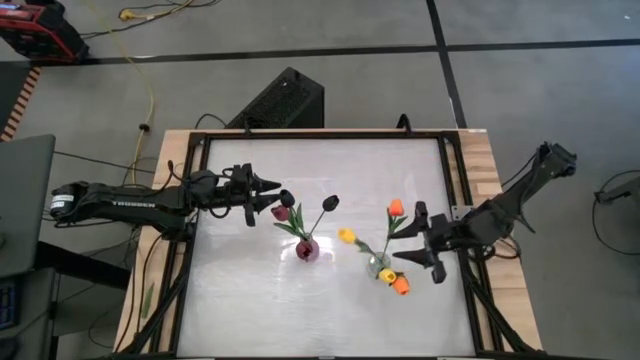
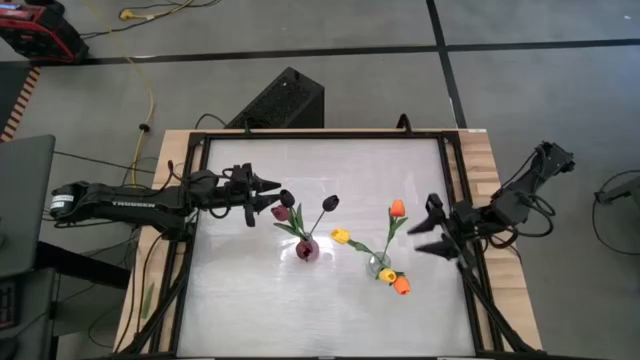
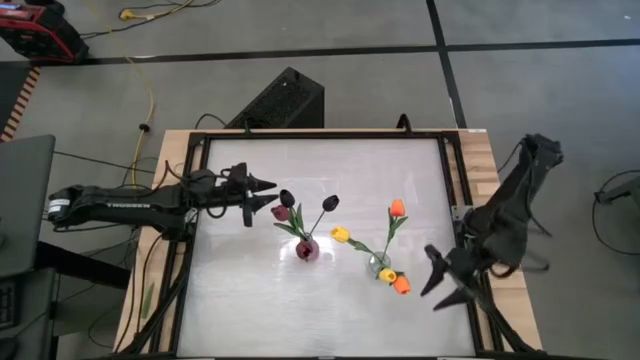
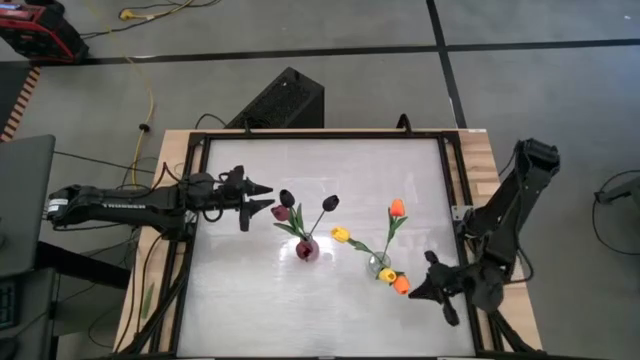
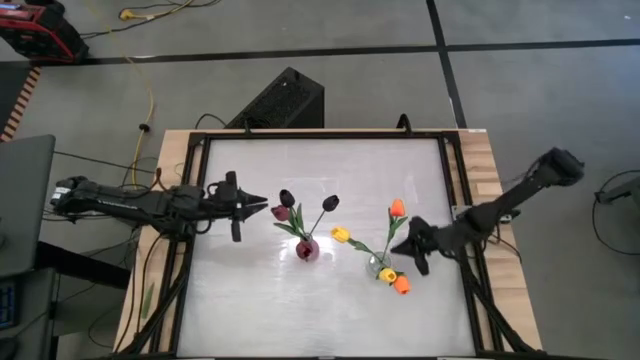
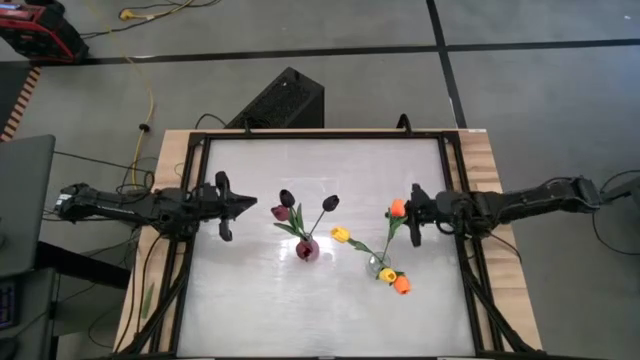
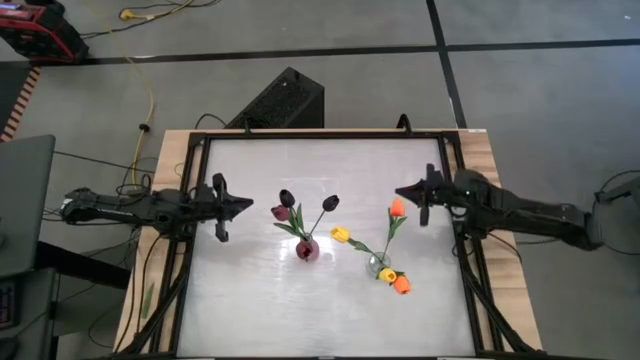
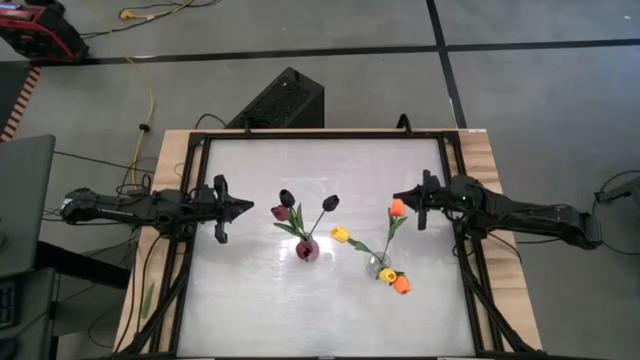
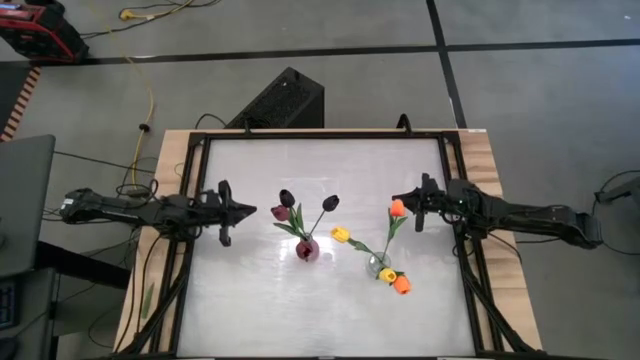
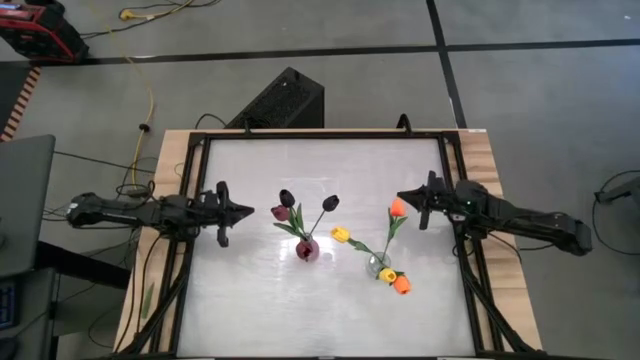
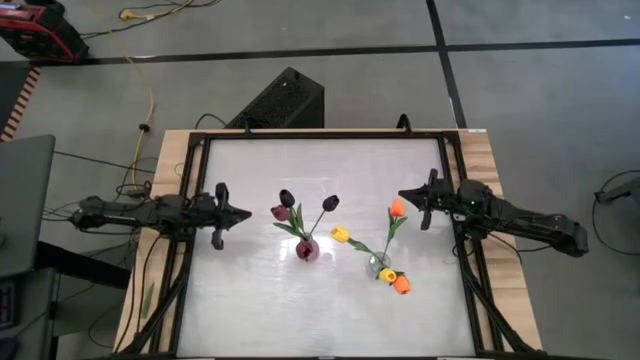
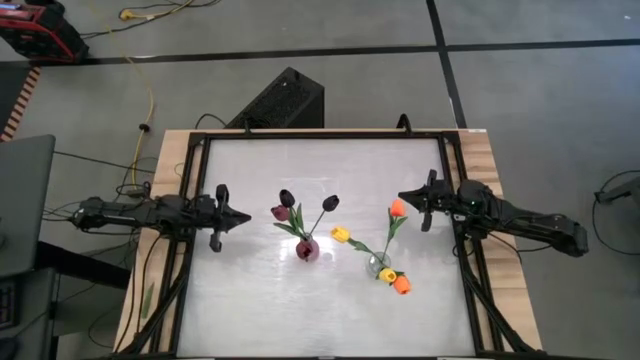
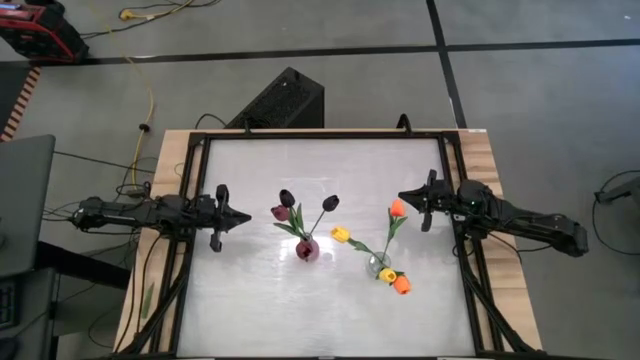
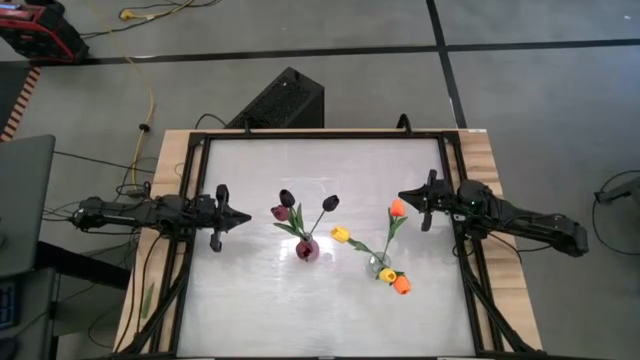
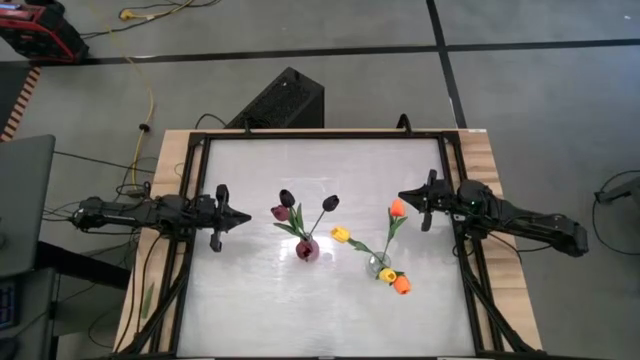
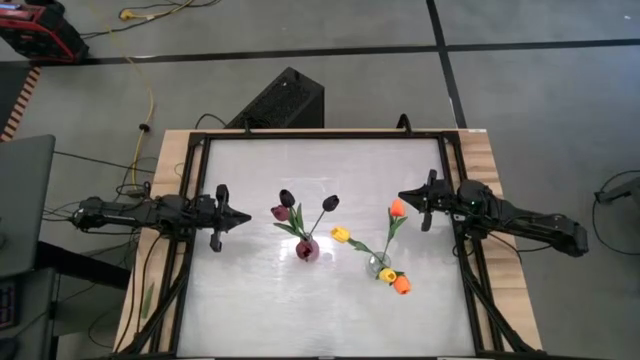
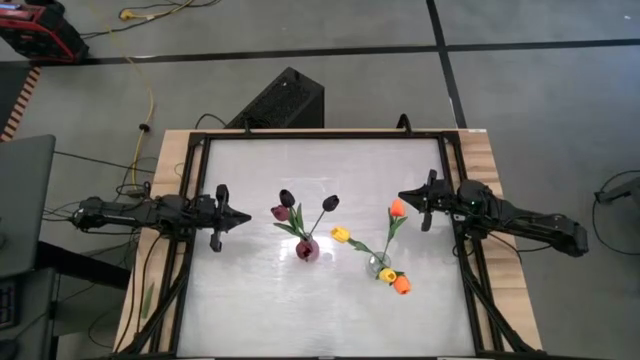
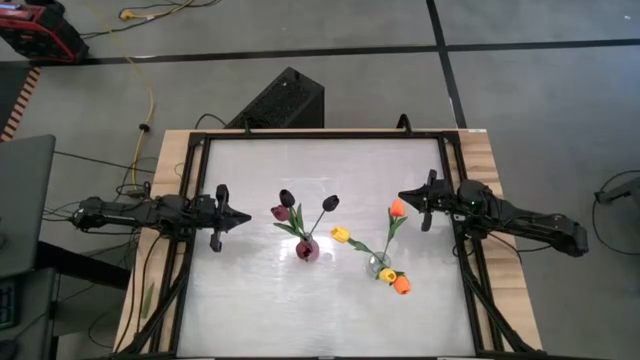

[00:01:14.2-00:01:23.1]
Task: Sort flowers into vase by color
Return to Home Position

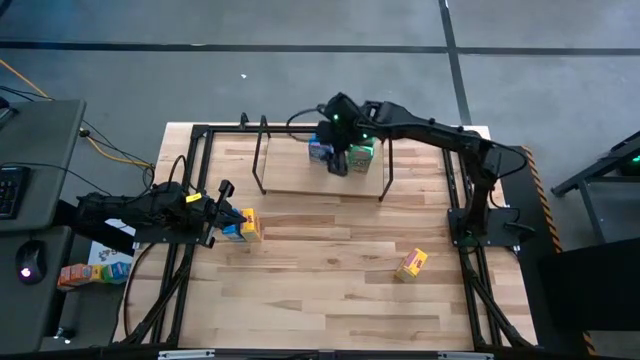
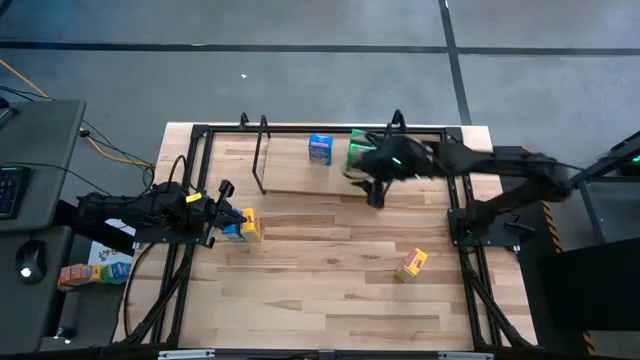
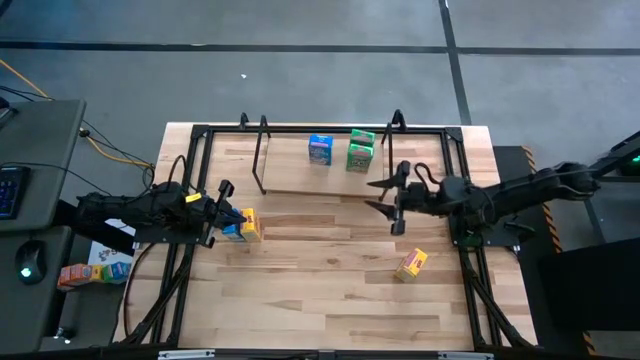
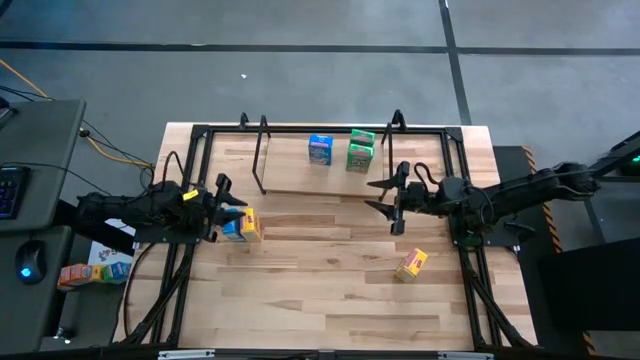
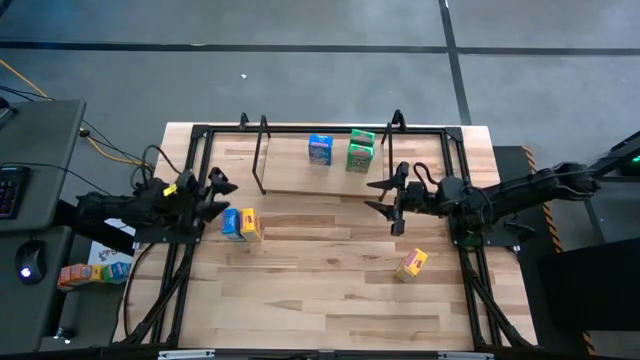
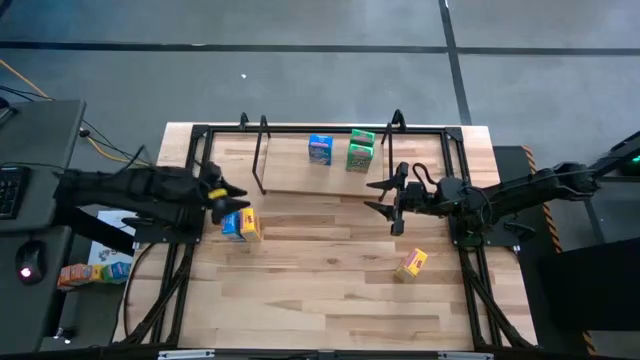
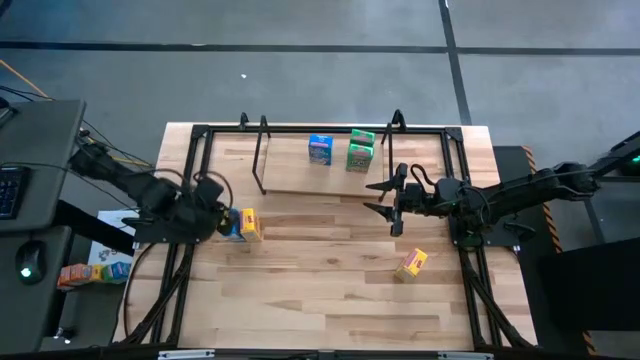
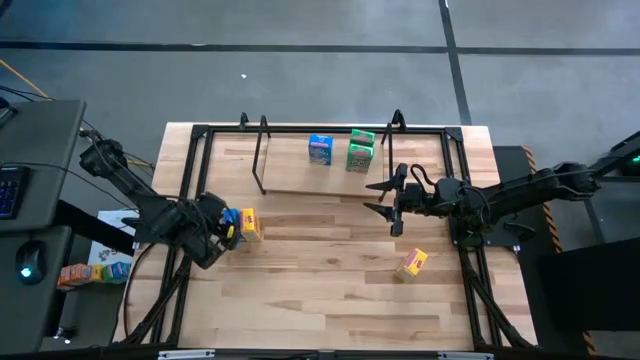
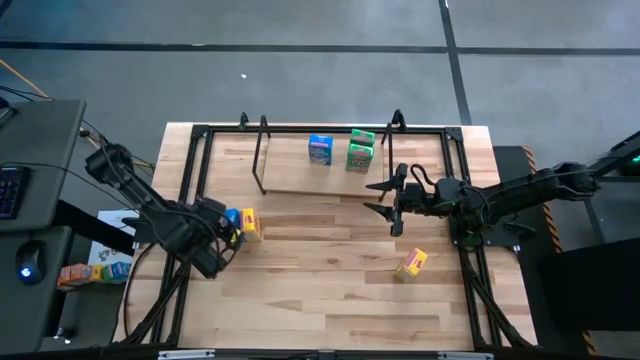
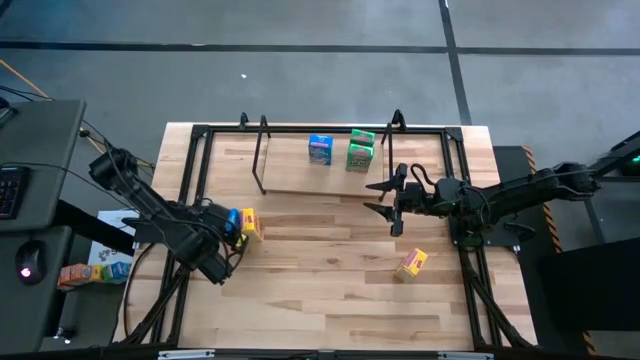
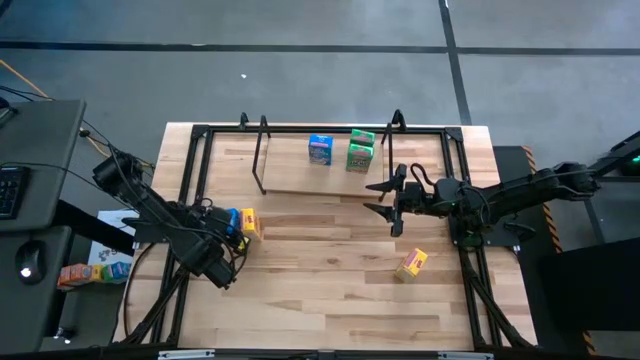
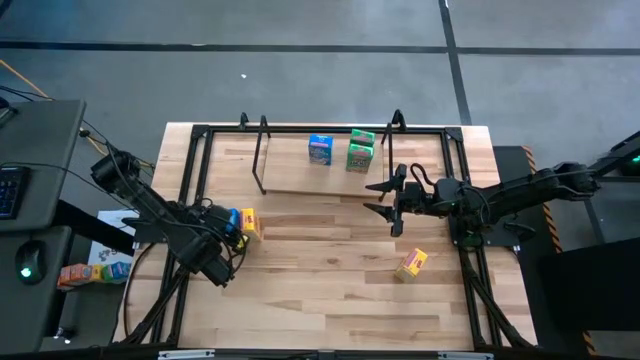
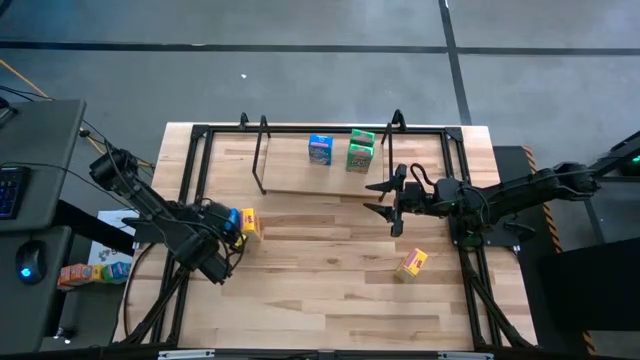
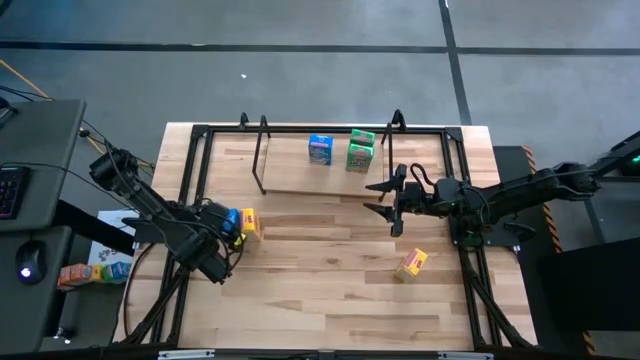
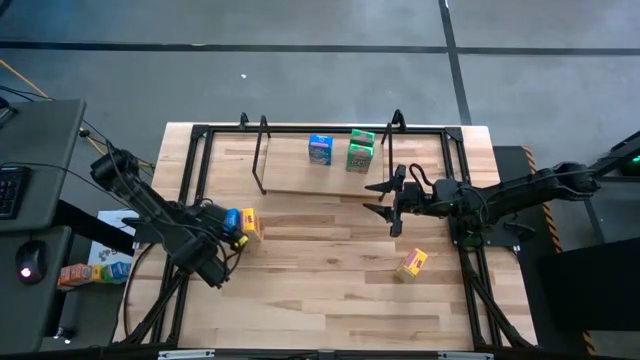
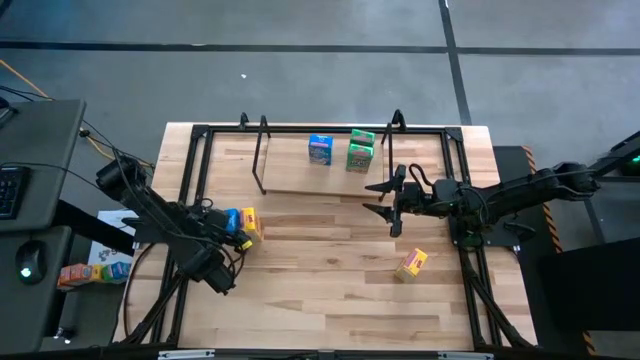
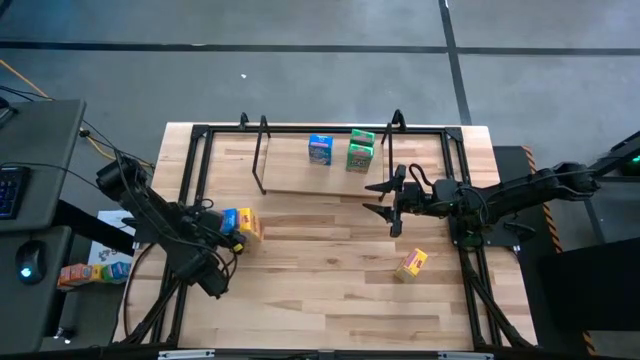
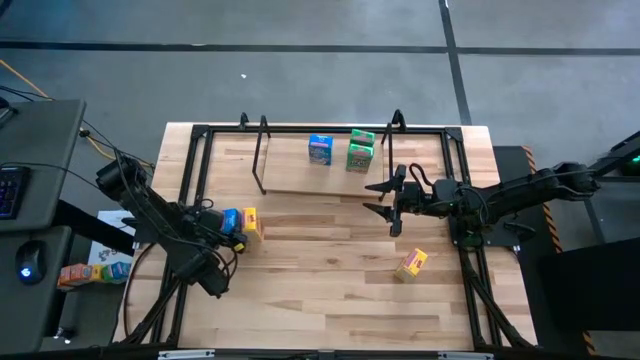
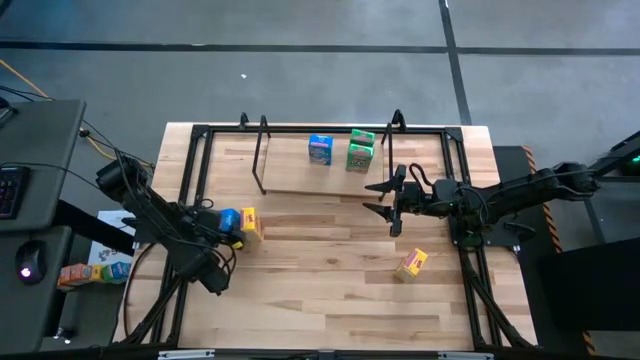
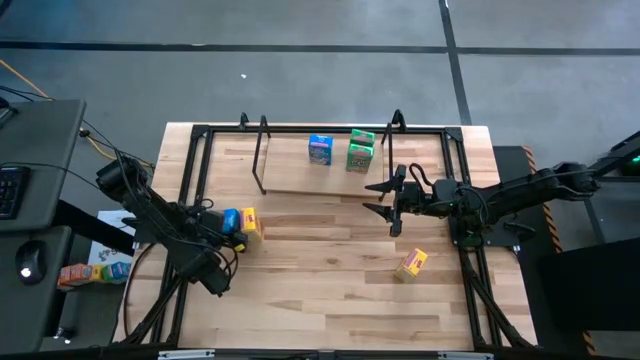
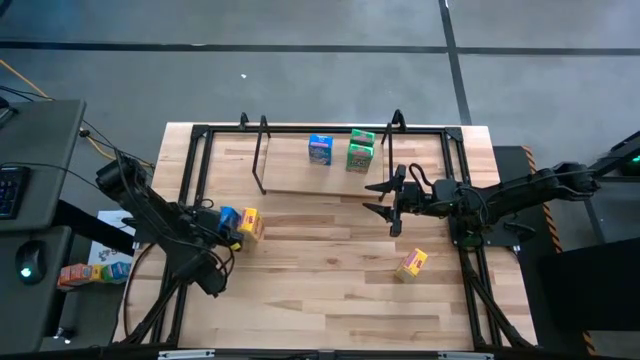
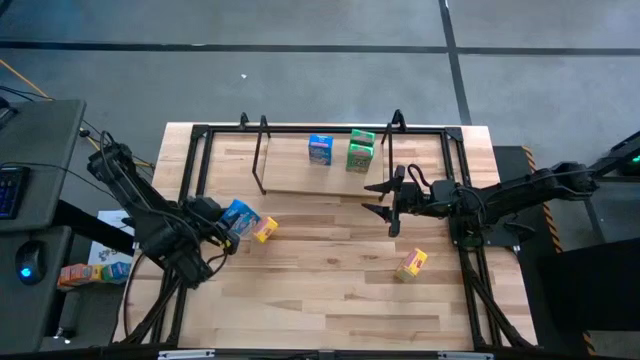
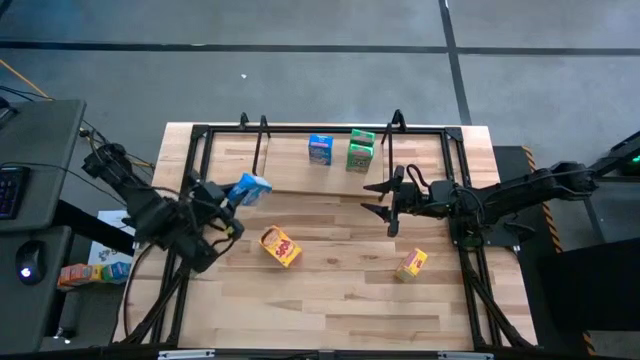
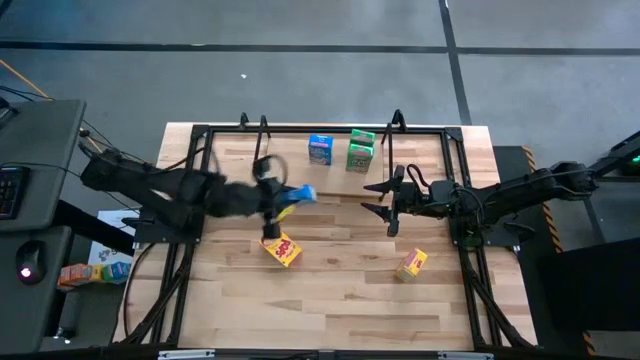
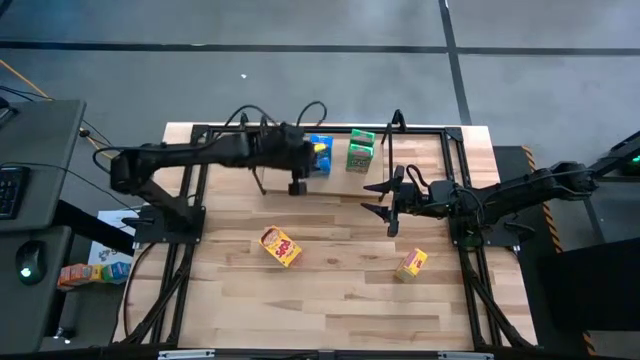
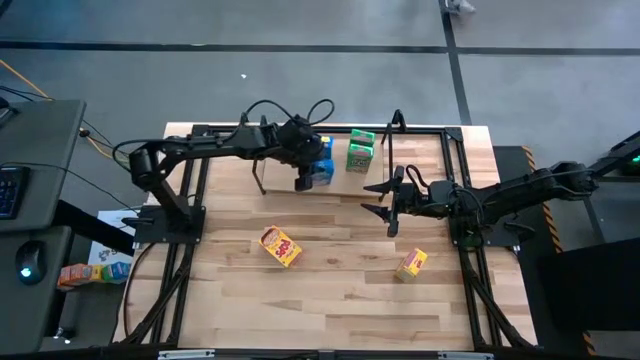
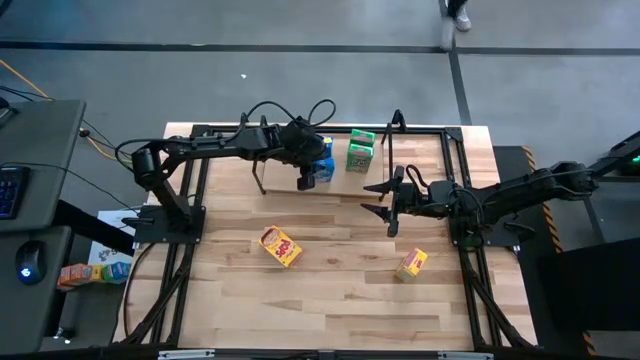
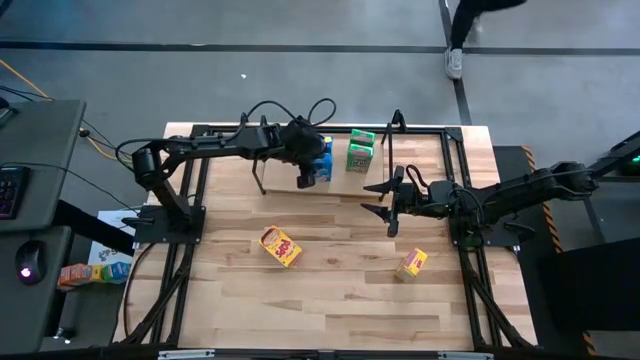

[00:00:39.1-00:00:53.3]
Task: Stack cereal on shelf
Put the blue cereal box on the shelf
